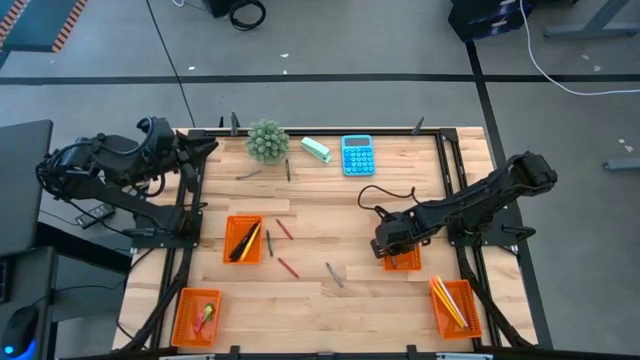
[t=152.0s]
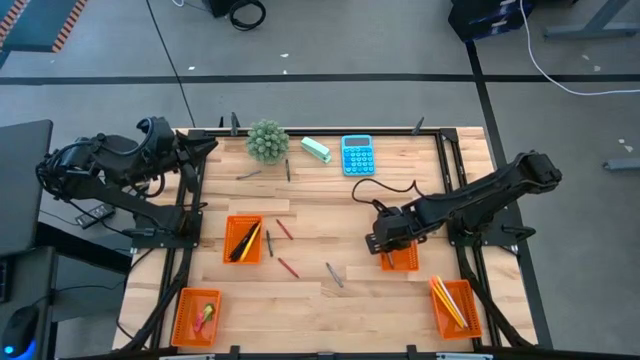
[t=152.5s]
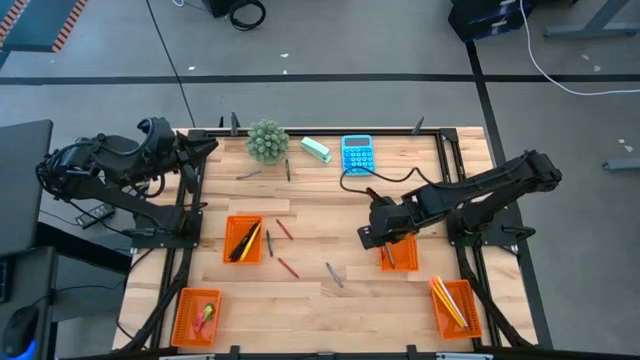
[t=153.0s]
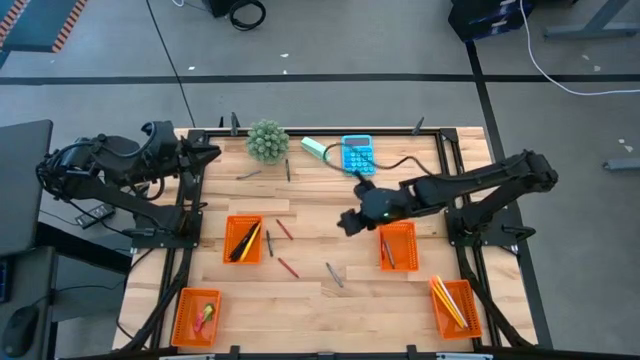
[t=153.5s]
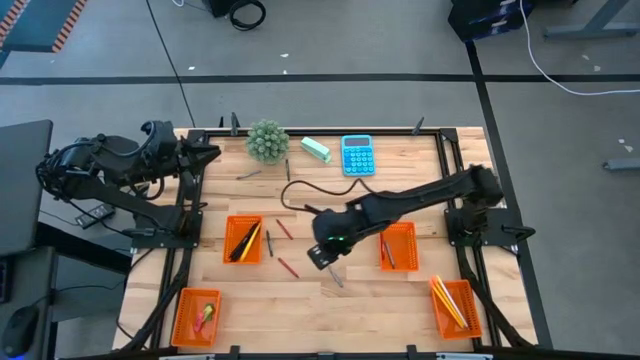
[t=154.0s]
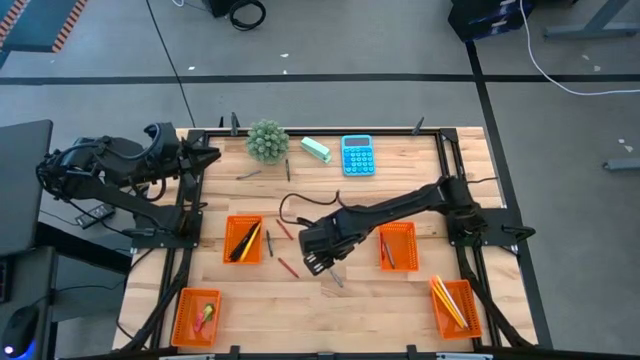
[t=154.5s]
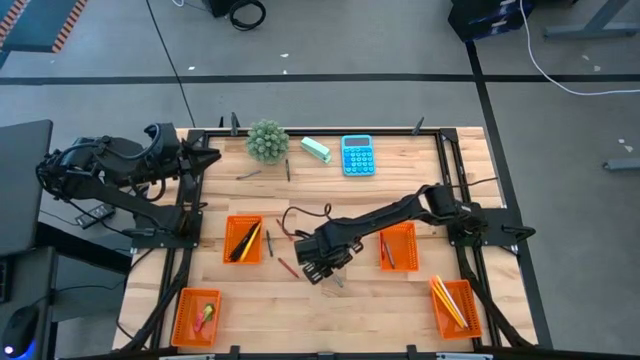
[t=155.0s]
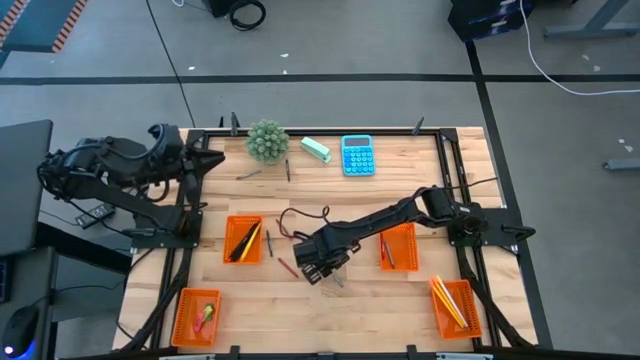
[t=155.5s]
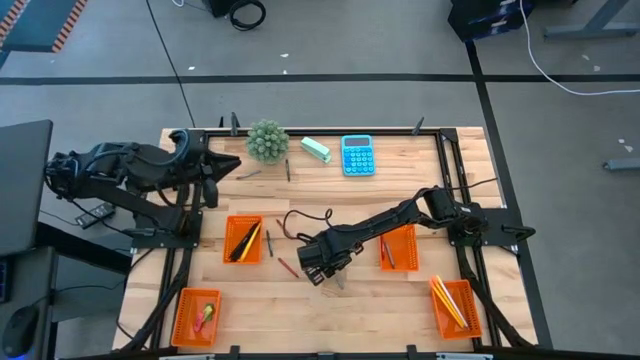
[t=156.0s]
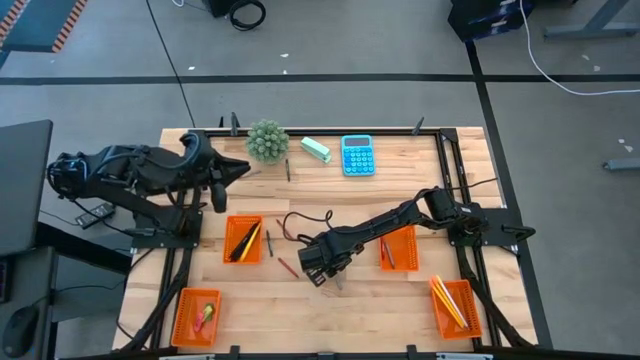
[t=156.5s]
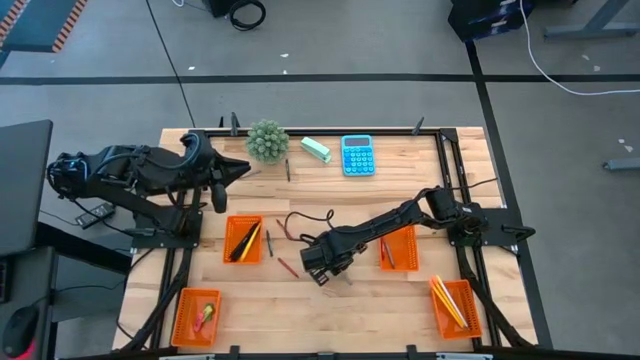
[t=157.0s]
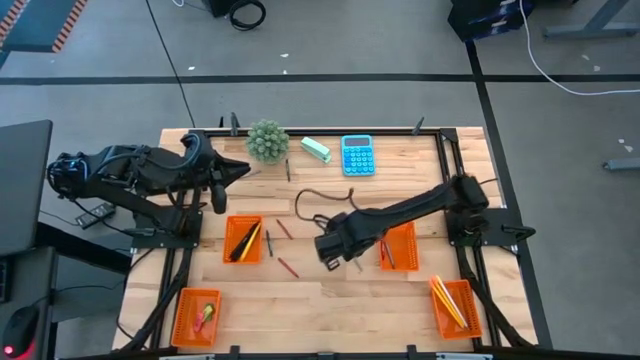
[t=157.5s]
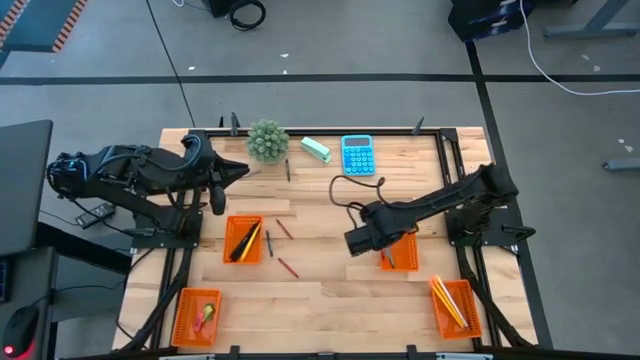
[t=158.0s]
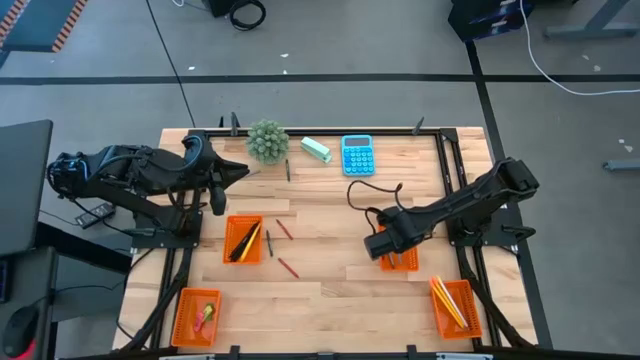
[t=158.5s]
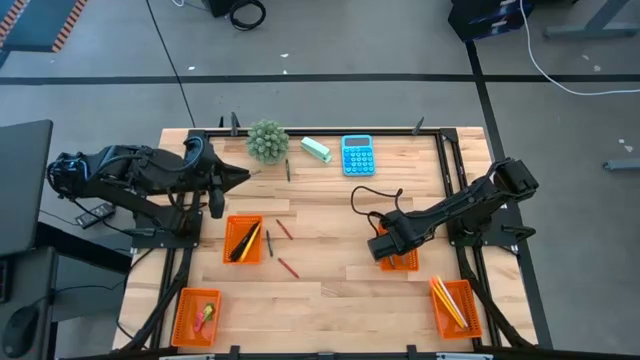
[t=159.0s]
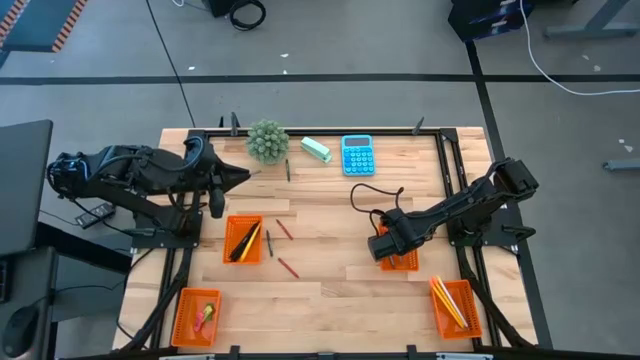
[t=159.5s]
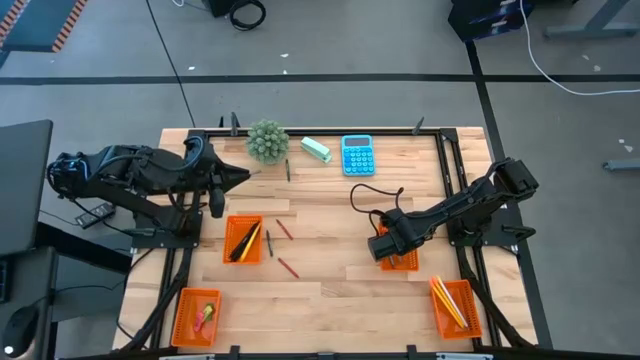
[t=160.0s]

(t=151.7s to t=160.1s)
Task: Sort crayons/erasers/pens/pencils in bins
Put the bottom gray crayon into the top right orange basket

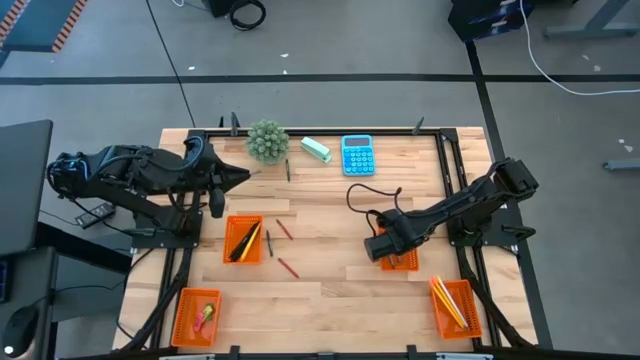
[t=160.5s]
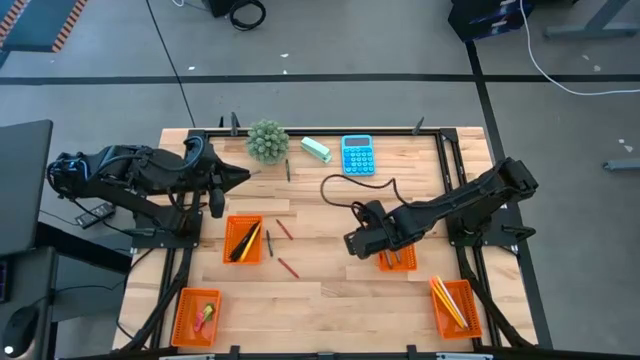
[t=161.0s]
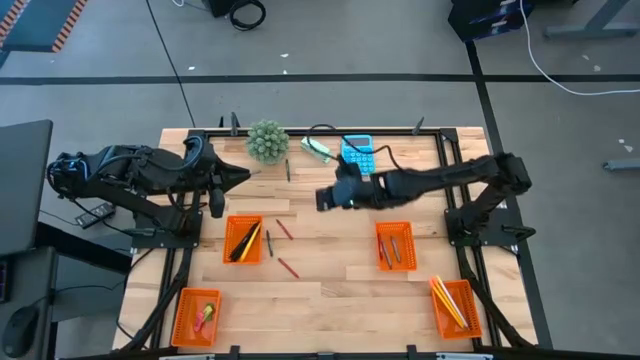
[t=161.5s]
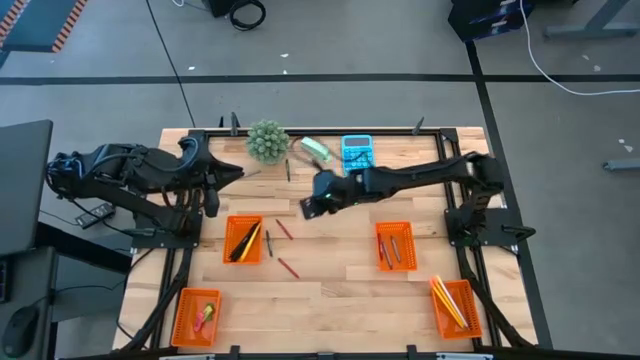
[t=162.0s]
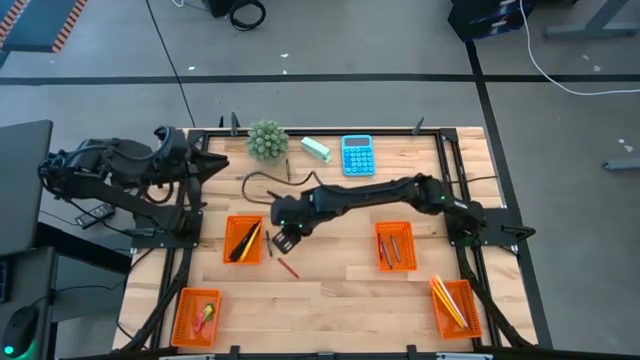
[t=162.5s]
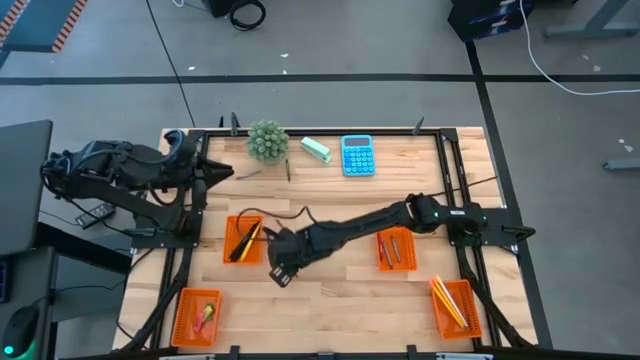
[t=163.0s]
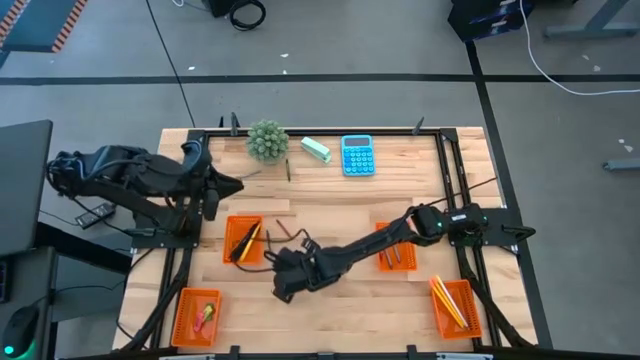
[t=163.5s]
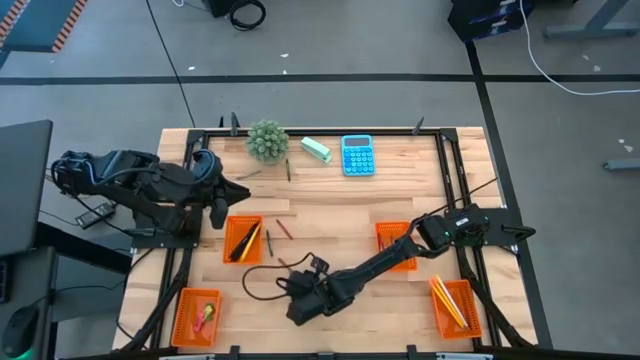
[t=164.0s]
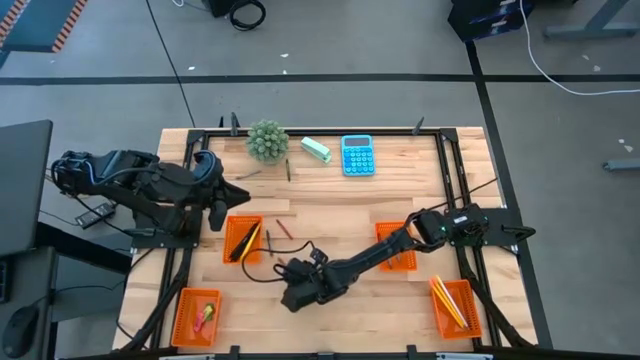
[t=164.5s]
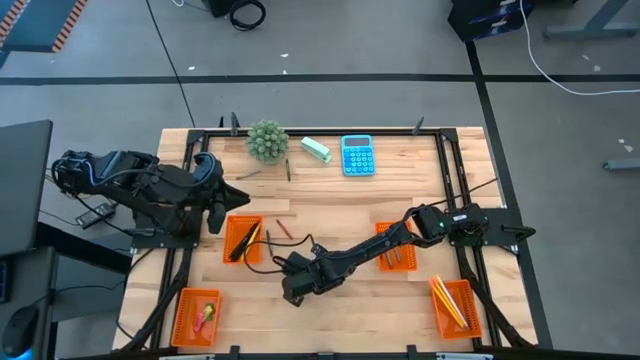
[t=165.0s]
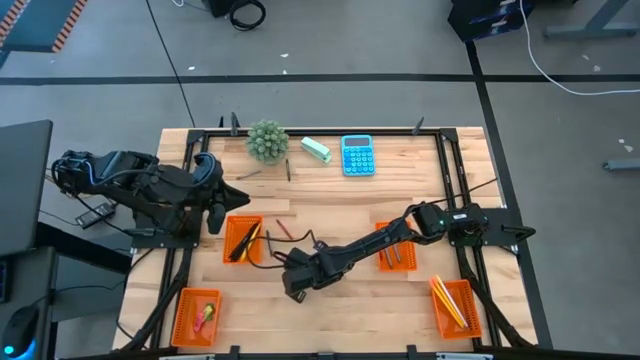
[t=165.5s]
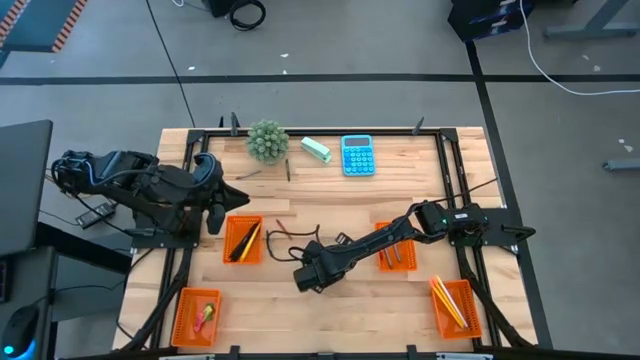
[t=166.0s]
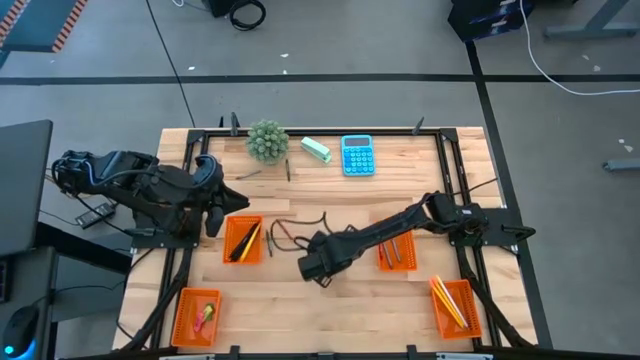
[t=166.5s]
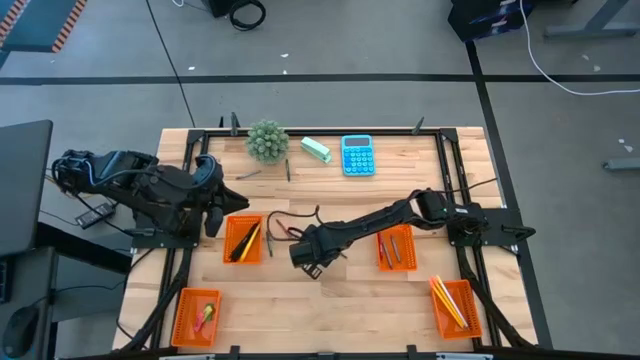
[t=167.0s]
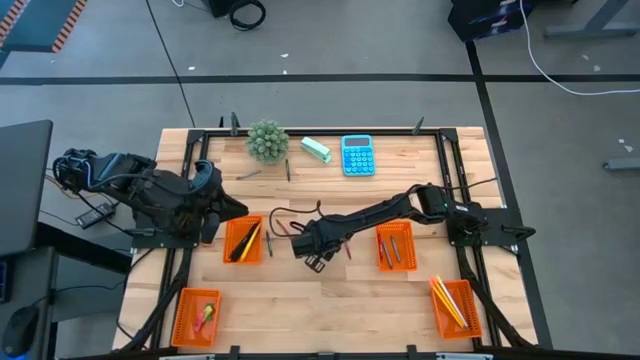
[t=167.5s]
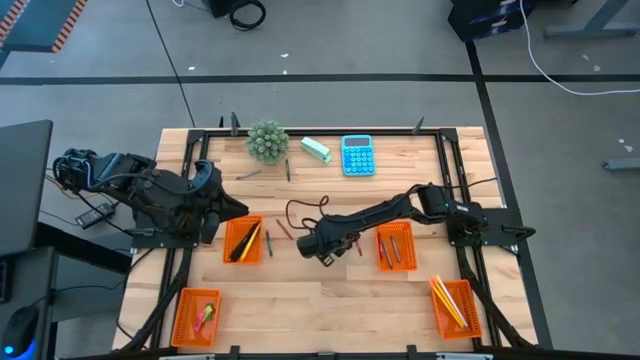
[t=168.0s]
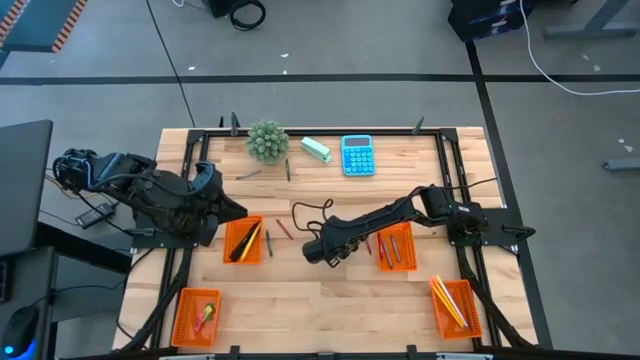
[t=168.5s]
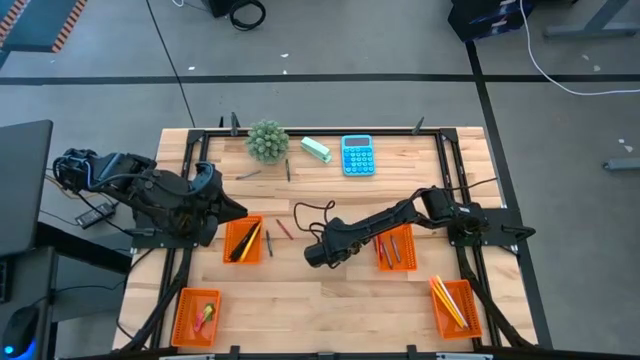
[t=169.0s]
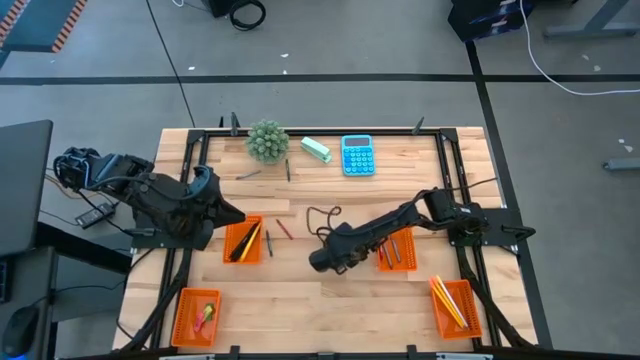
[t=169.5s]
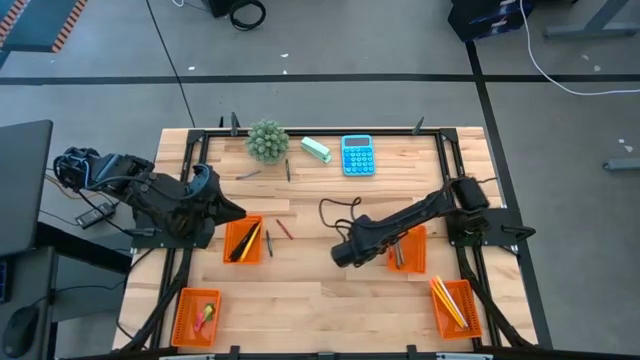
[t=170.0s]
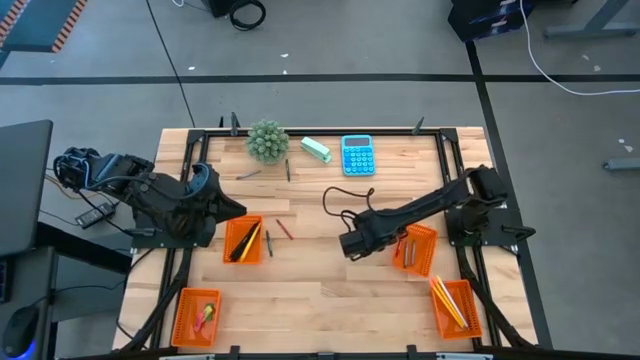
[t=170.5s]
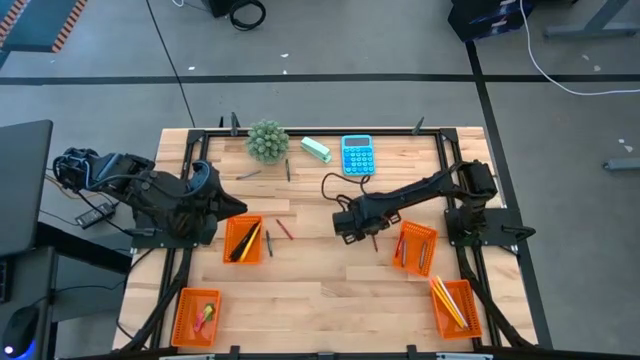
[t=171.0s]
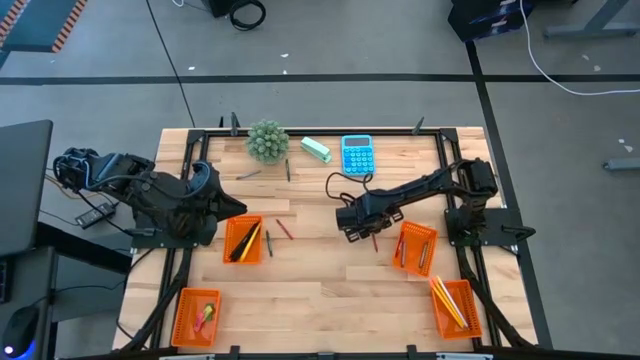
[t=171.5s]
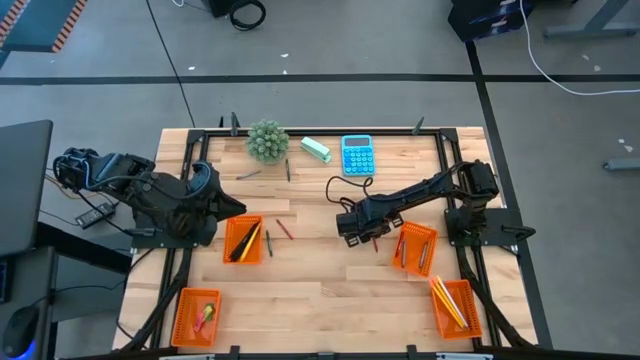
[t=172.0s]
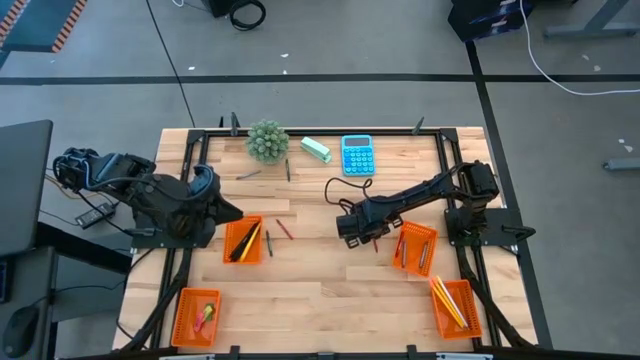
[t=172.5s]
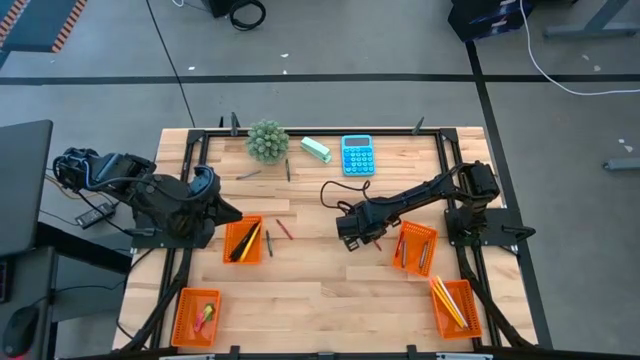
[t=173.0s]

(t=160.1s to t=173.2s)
Put the bottom red crayon into the top right orange basket

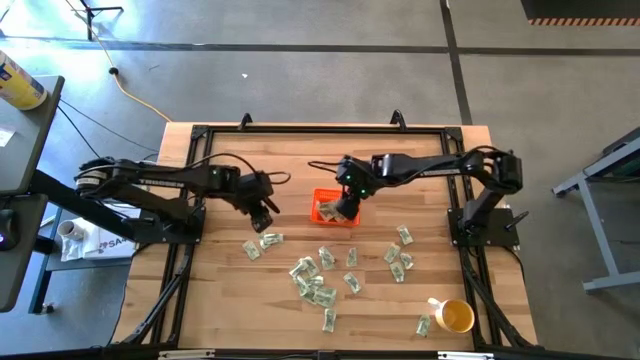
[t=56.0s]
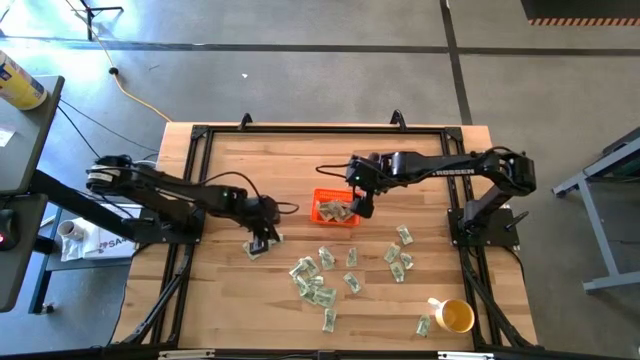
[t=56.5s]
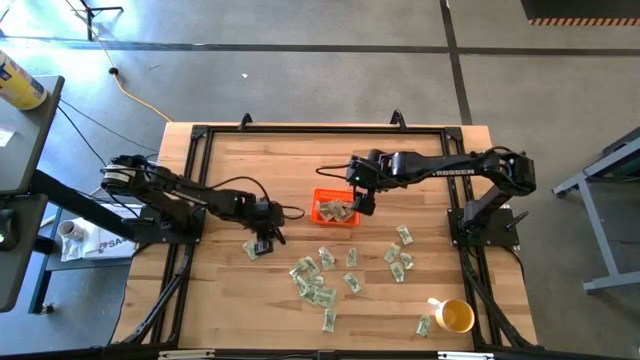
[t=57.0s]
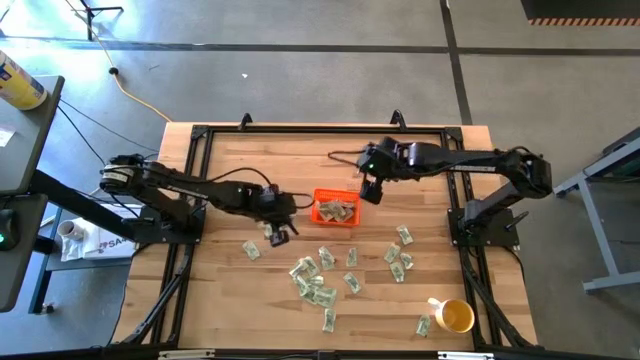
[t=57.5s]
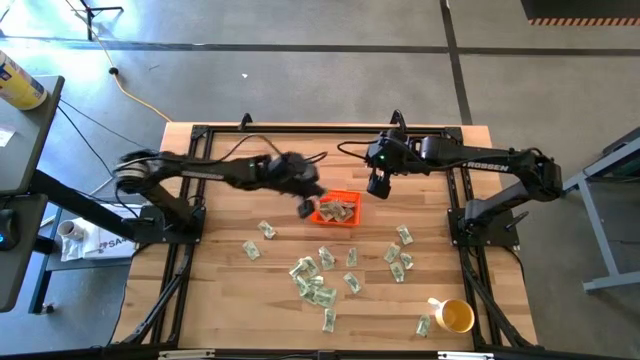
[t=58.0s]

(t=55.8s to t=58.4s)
Task: Pick and place Stevia / Truvia into bins
Put the stevia packet into the orange bin
